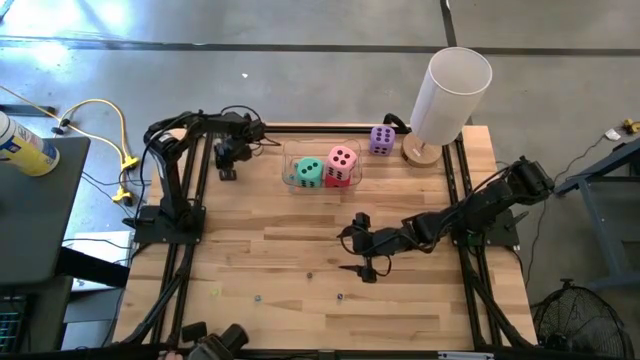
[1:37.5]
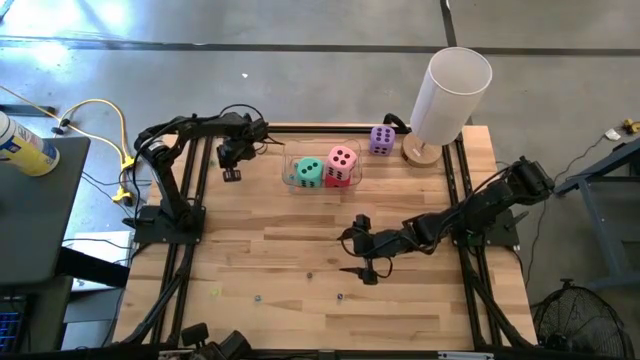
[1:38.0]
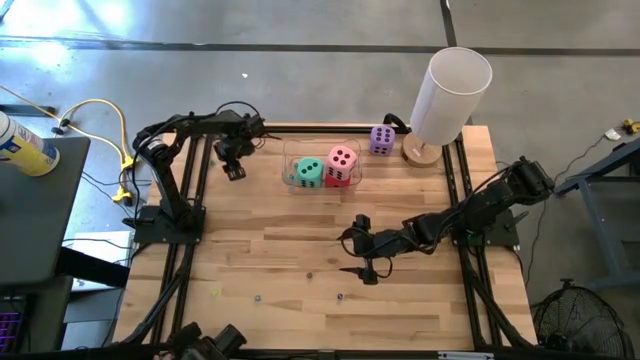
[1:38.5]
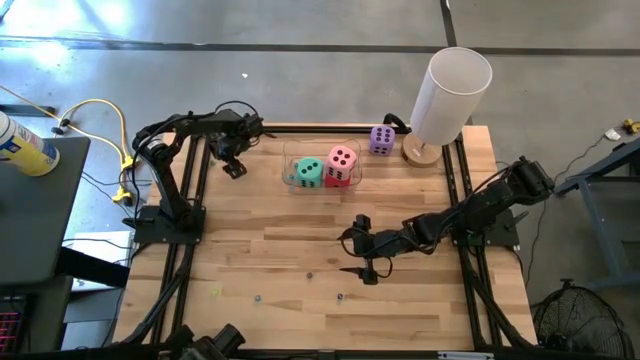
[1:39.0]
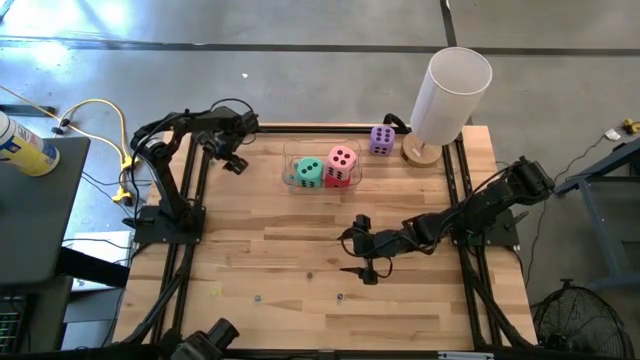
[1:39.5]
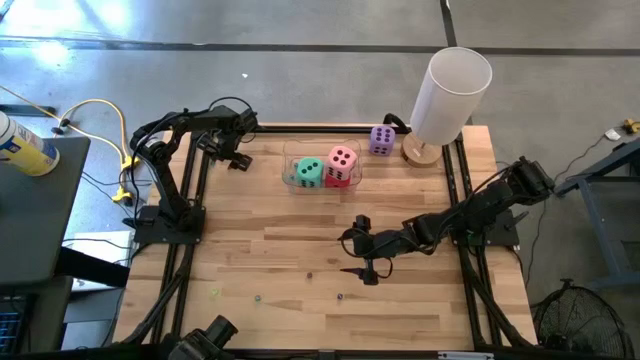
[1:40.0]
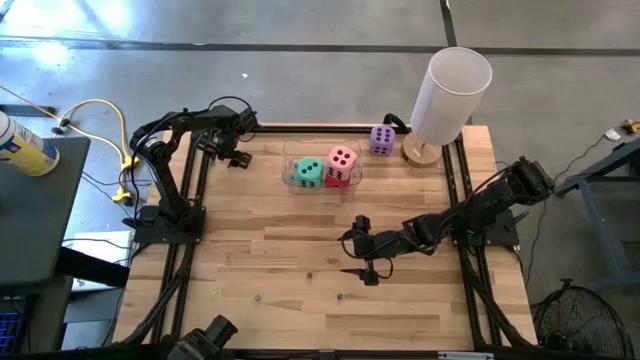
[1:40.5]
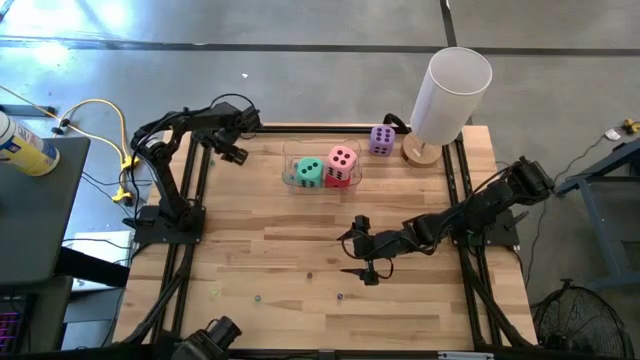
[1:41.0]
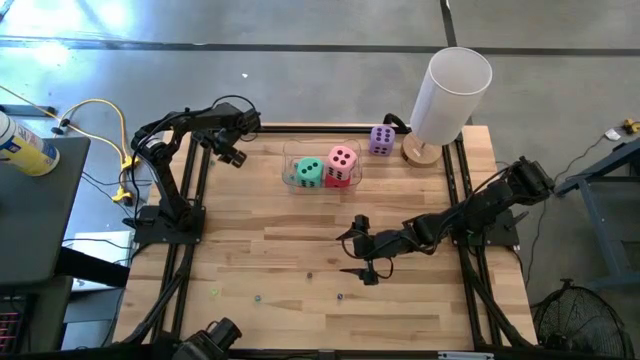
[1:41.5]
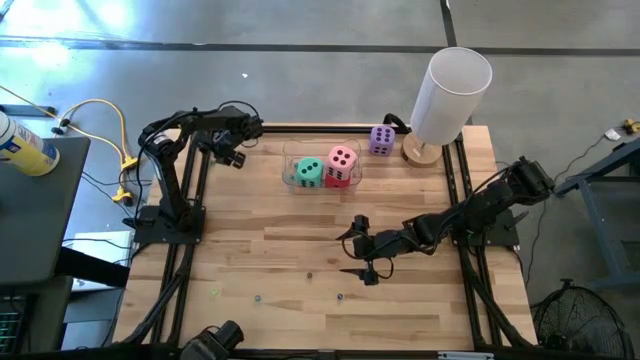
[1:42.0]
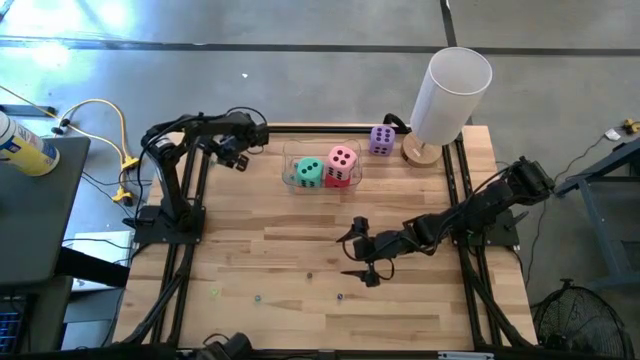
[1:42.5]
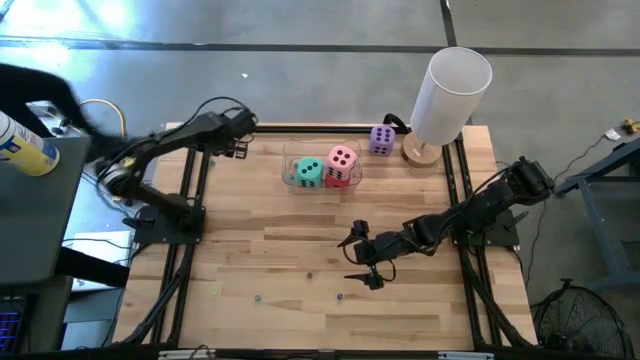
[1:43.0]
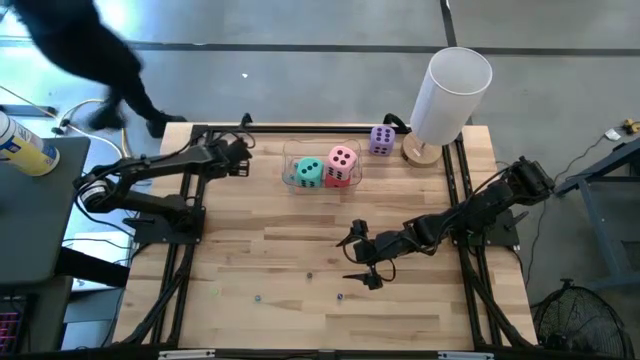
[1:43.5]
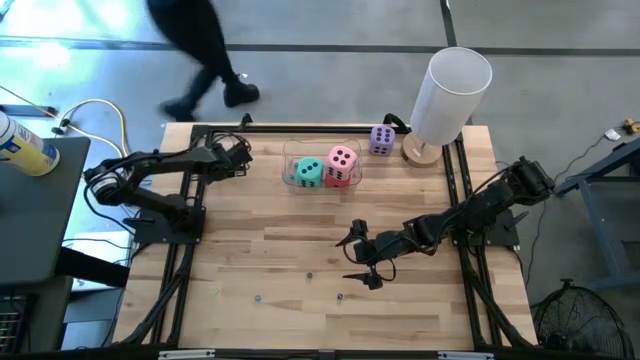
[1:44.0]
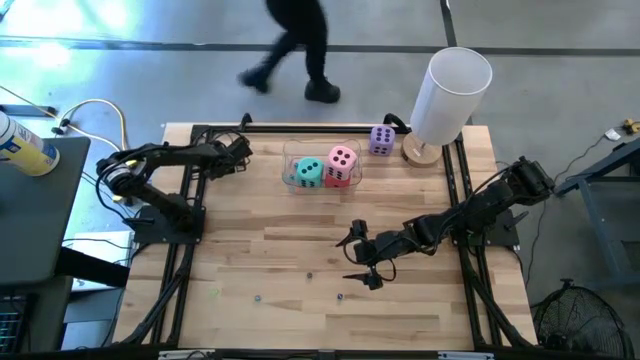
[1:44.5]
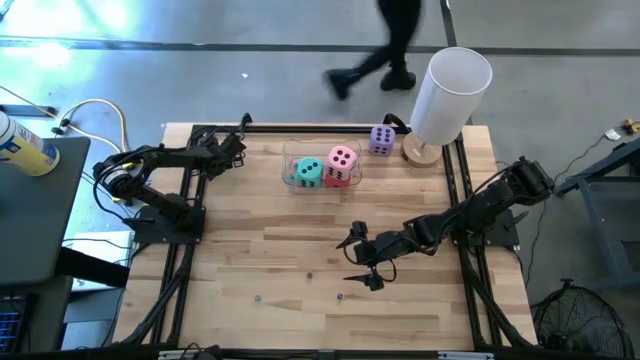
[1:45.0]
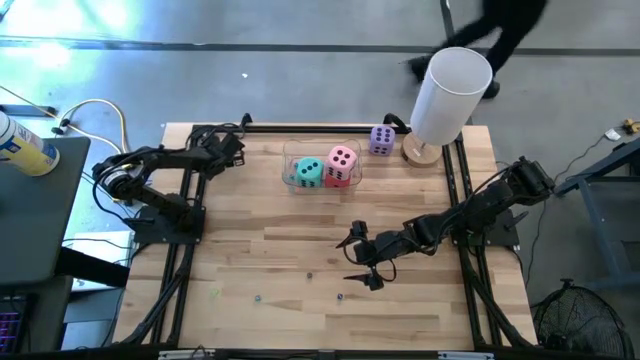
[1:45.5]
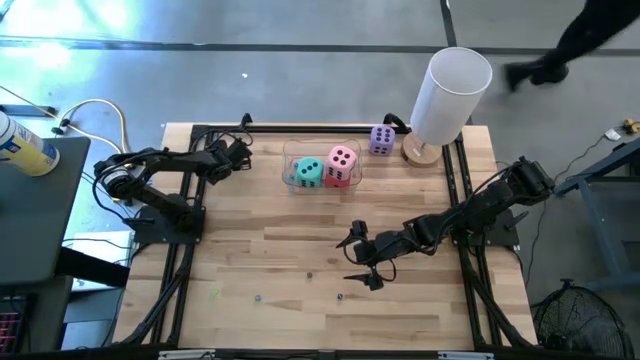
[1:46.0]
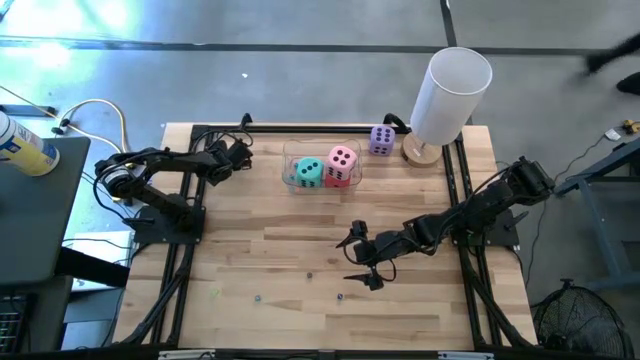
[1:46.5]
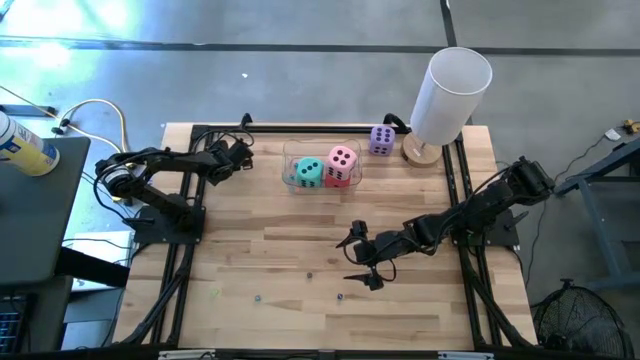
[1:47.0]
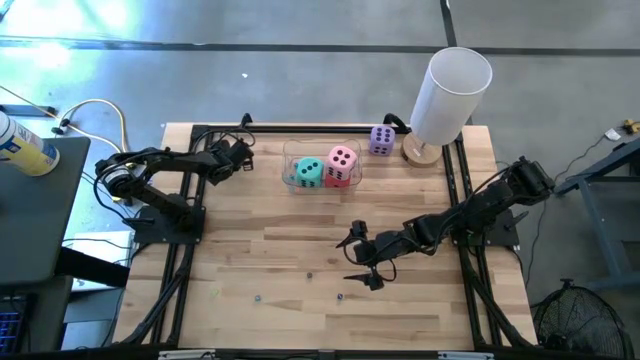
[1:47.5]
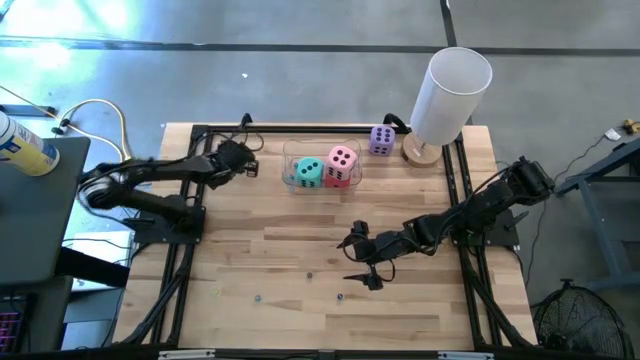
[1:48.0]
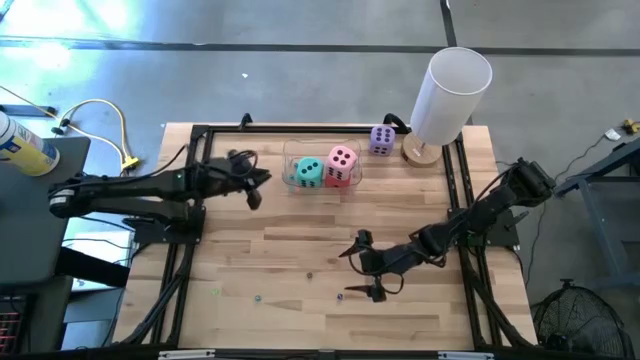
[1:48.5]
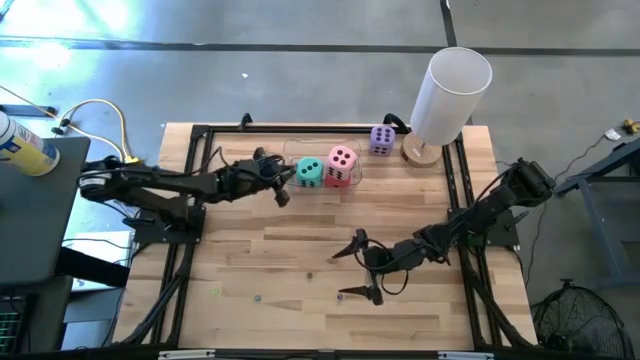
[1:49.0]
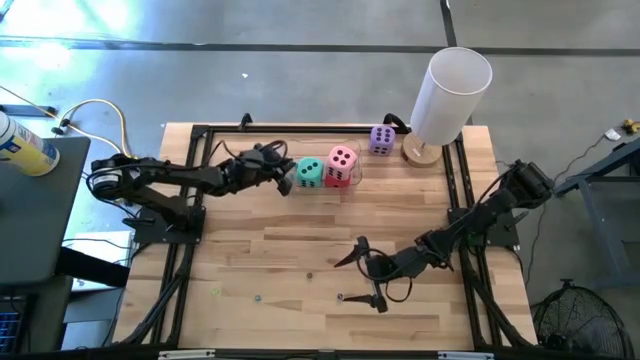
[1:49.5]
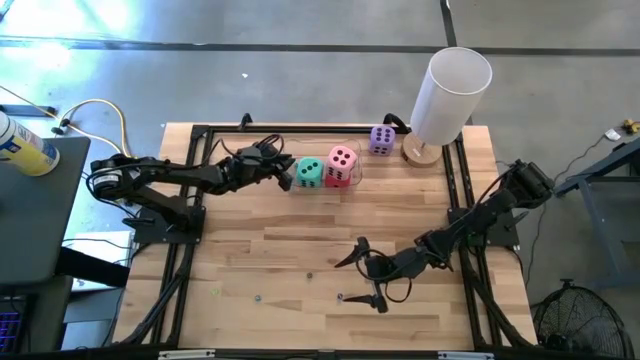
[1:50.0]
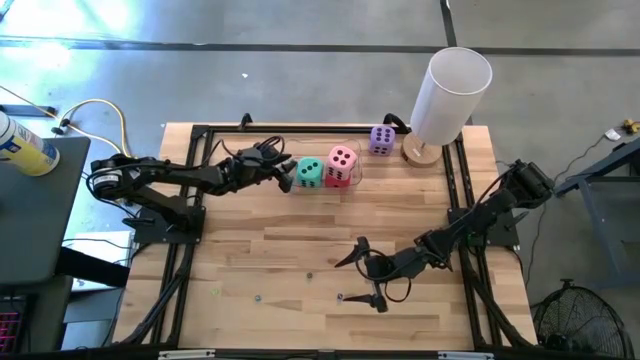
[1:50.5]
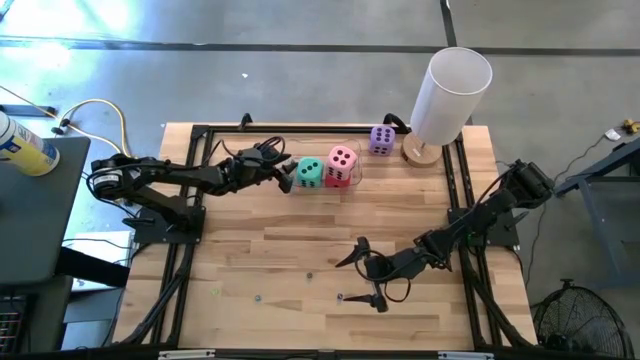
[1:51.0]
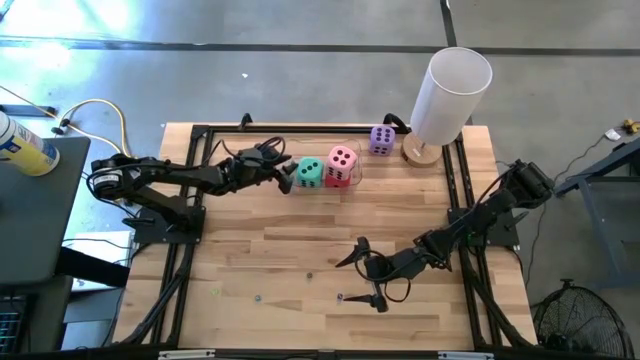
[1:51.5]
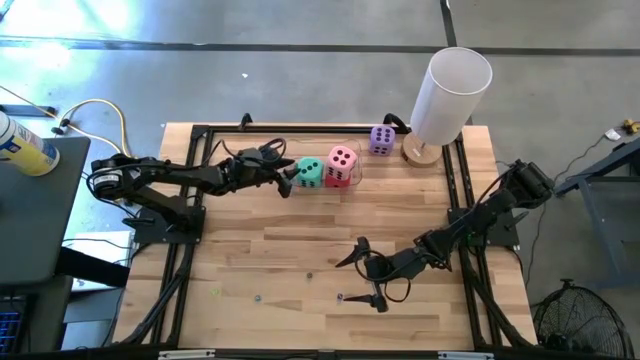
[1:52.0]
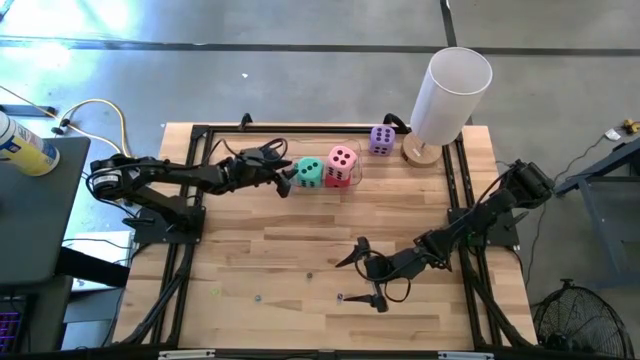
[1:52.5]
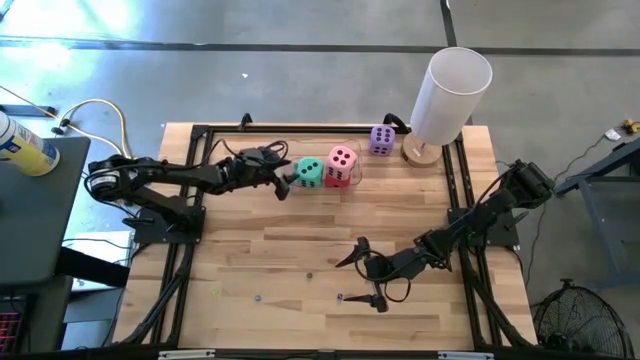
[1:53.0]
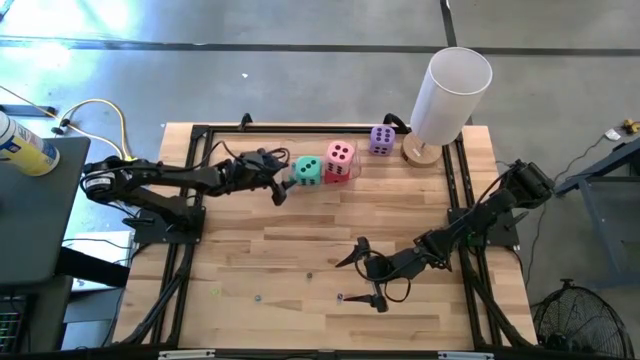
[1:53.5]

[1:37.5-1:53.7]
Task: Pick & Place Dice
Put the small green dice into the transparent bin

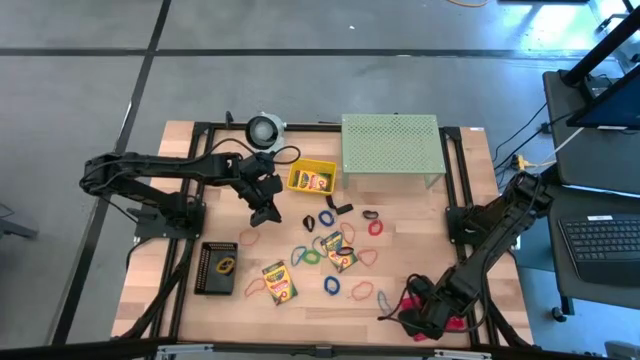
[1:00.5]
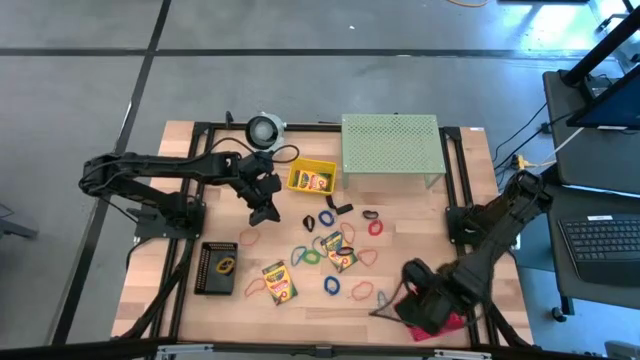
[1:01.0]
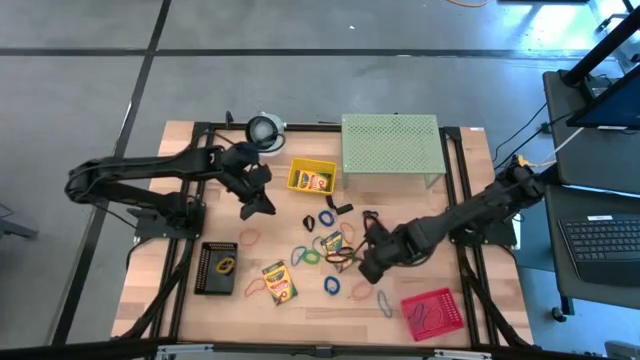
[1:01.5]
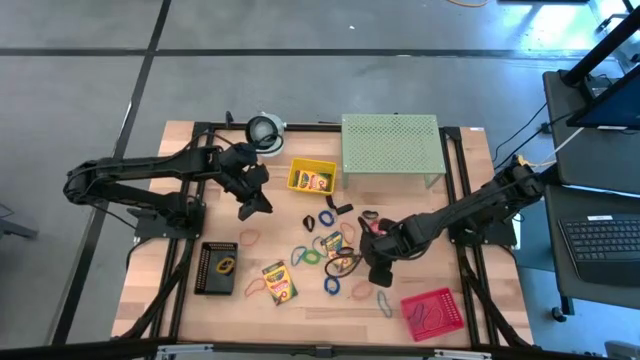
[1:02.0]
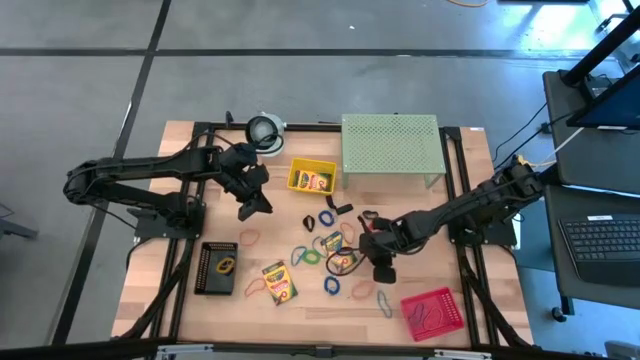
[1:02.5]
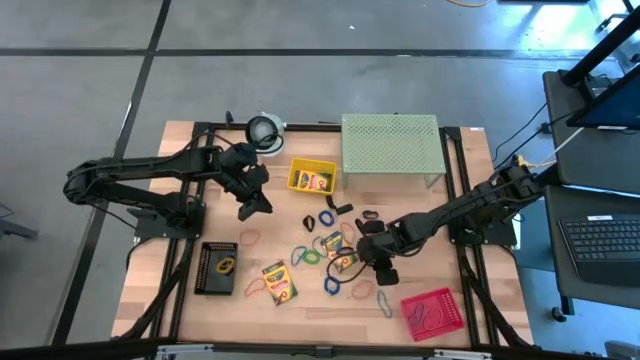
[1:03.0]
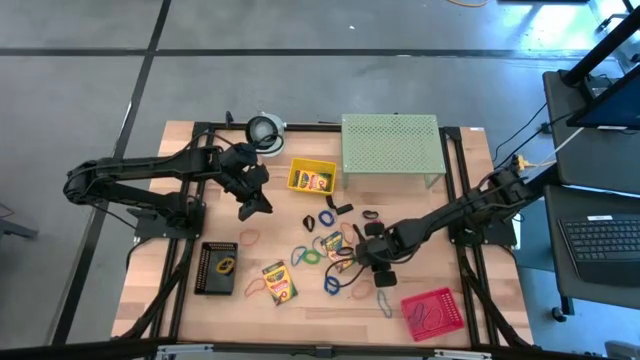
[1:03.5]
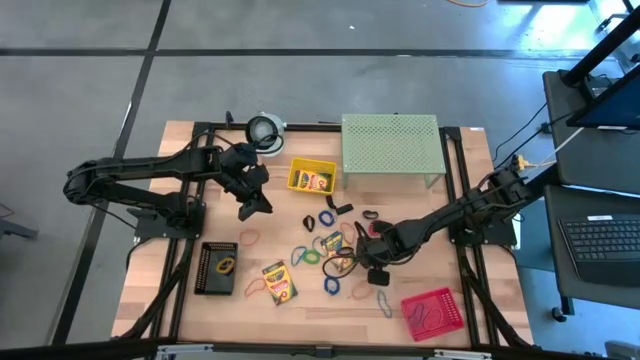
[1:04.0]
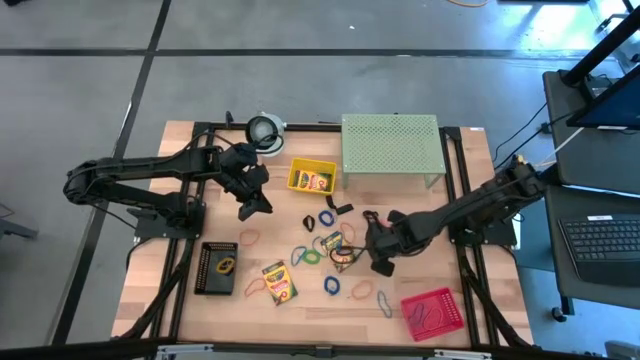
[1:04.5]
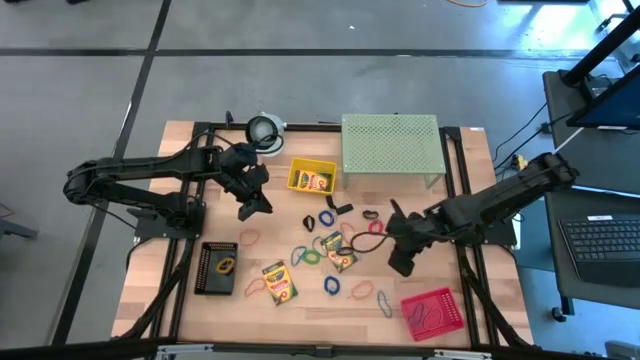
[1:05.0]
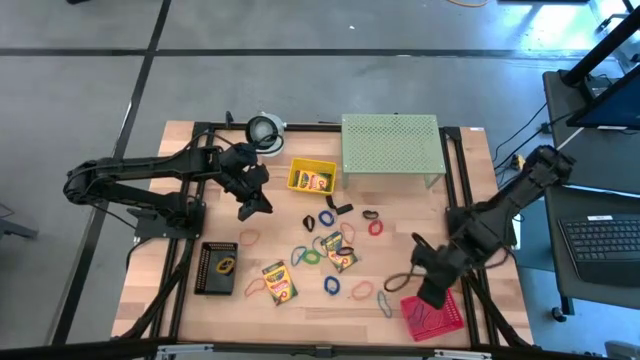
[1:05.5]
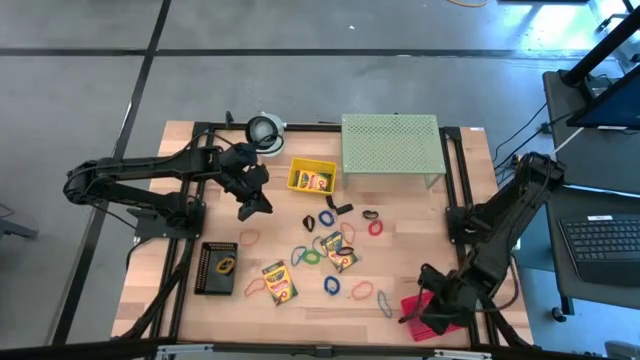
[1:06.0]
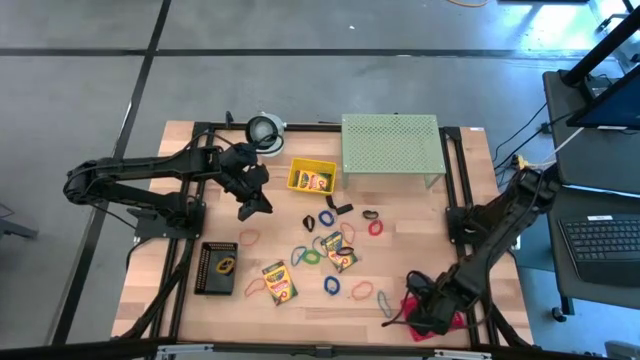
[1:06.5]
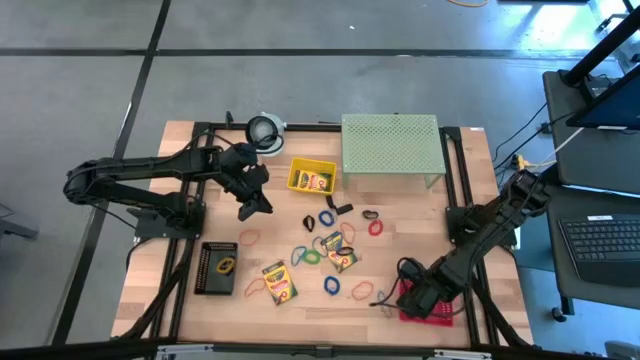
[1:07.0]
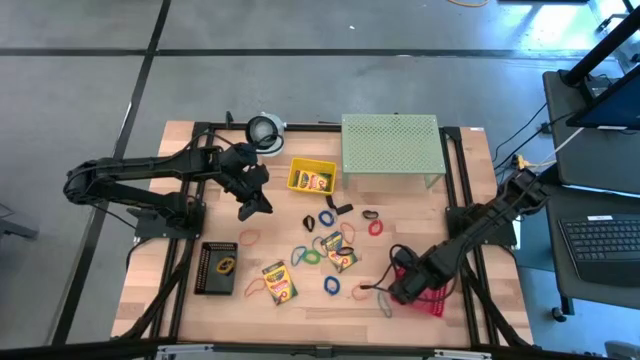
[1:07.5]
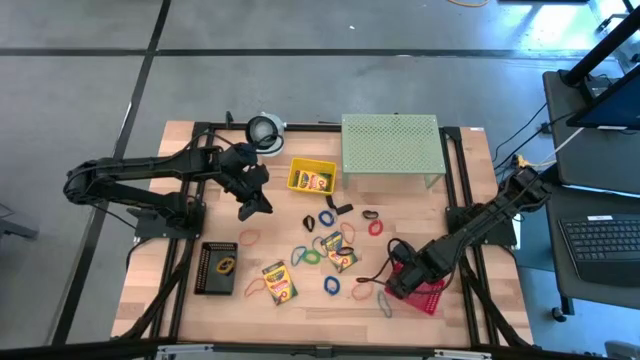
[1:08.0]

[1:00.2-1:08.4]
Task: Pick & Place Office Desk Supplies
Put the orange rubber band into the red bin
